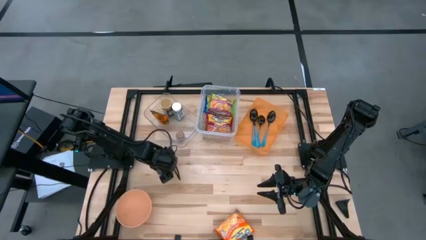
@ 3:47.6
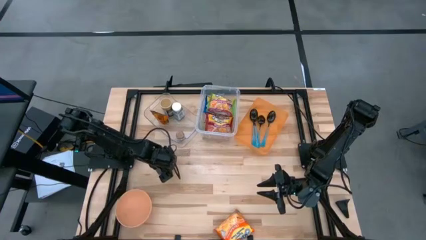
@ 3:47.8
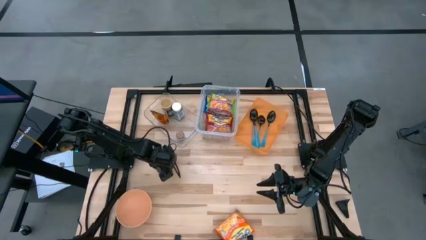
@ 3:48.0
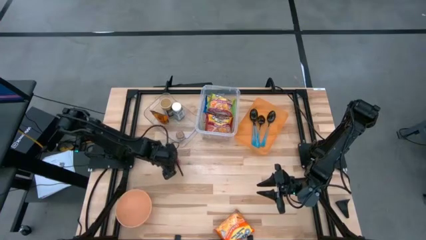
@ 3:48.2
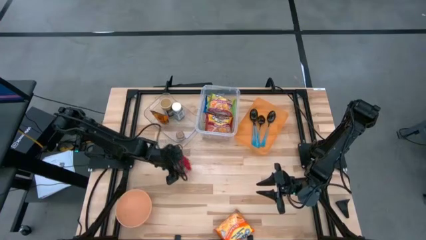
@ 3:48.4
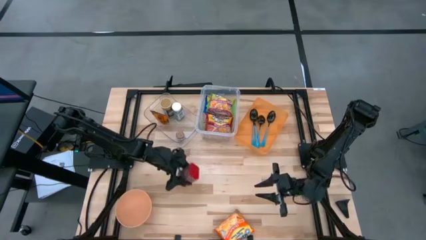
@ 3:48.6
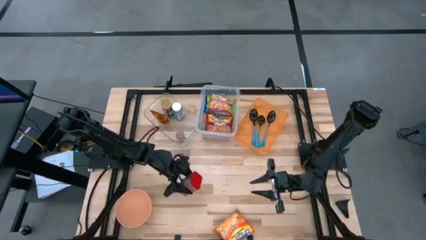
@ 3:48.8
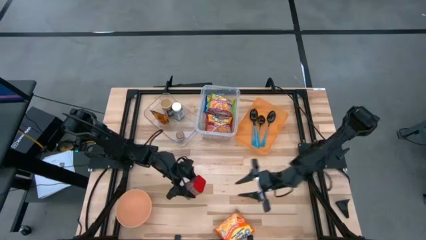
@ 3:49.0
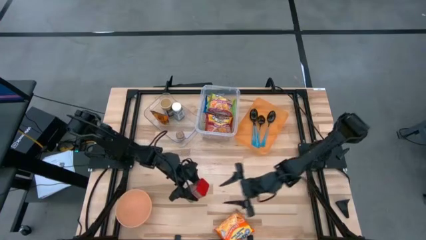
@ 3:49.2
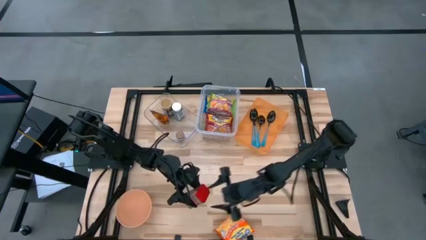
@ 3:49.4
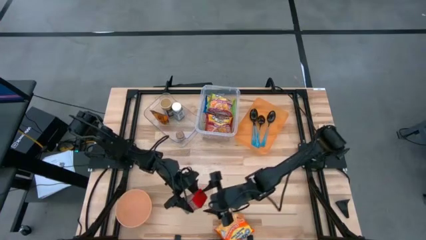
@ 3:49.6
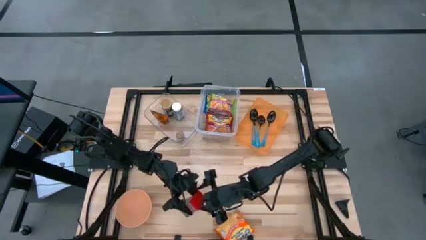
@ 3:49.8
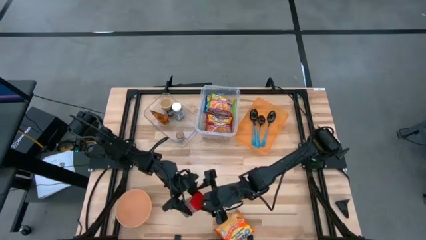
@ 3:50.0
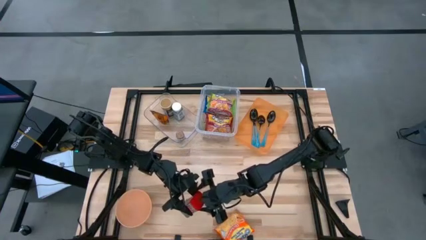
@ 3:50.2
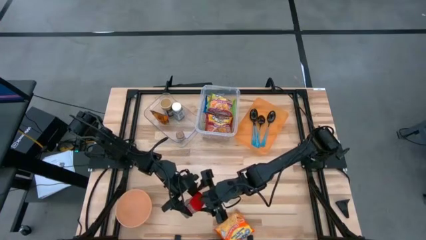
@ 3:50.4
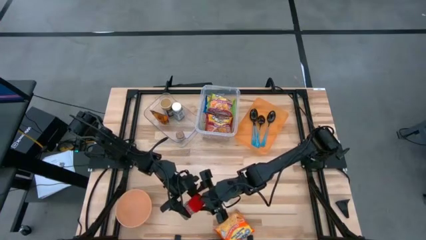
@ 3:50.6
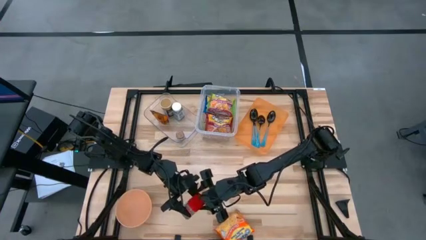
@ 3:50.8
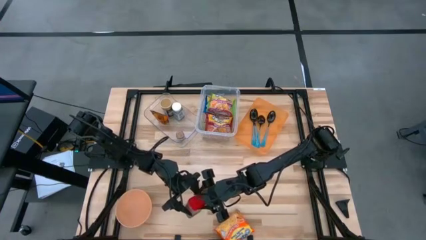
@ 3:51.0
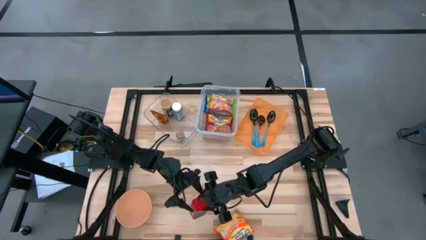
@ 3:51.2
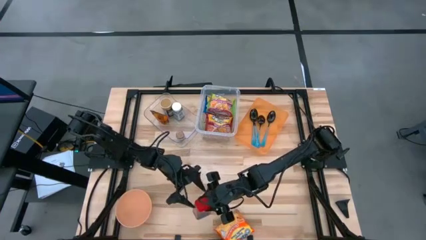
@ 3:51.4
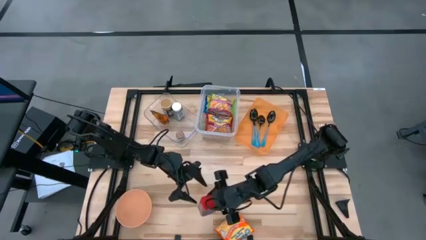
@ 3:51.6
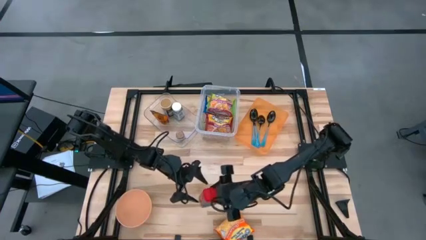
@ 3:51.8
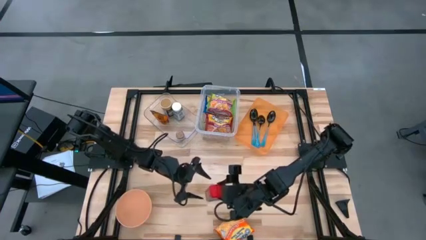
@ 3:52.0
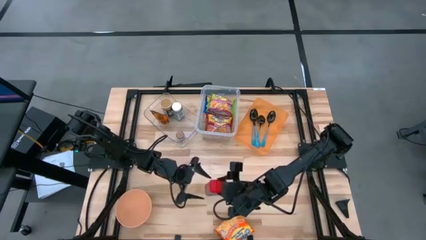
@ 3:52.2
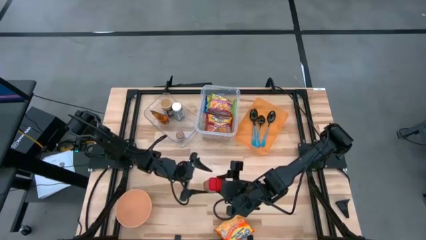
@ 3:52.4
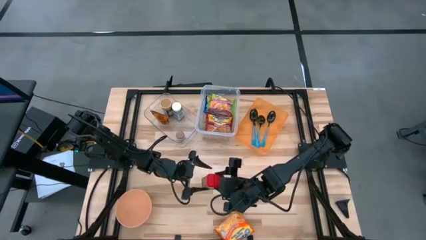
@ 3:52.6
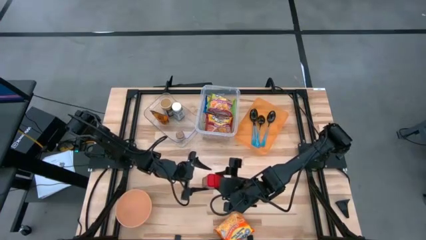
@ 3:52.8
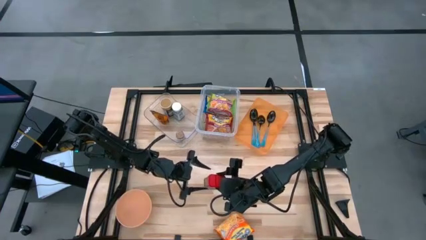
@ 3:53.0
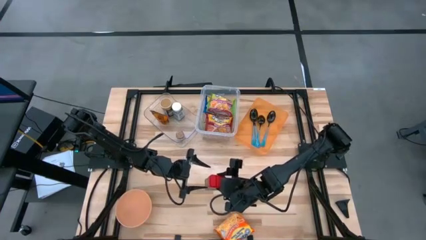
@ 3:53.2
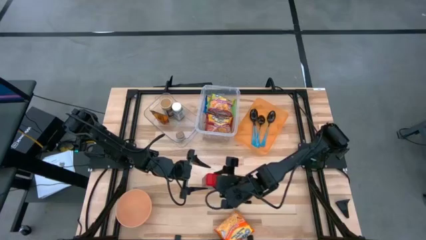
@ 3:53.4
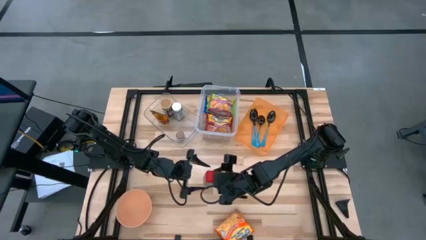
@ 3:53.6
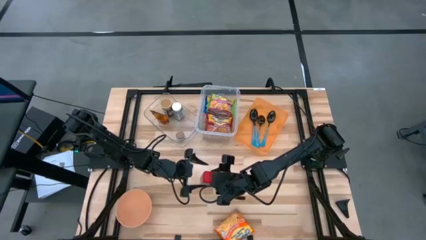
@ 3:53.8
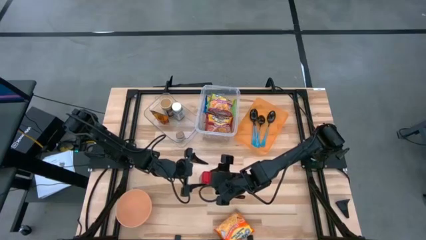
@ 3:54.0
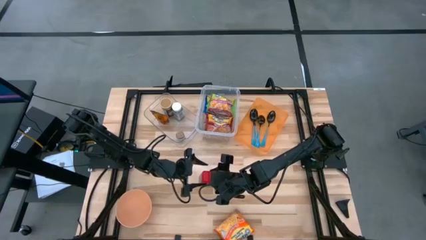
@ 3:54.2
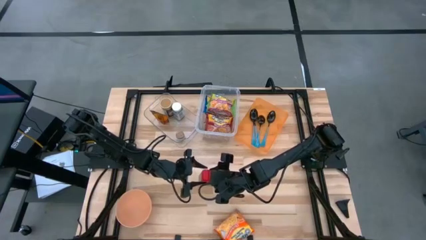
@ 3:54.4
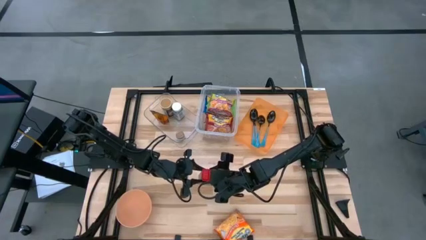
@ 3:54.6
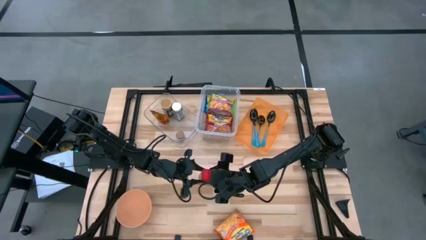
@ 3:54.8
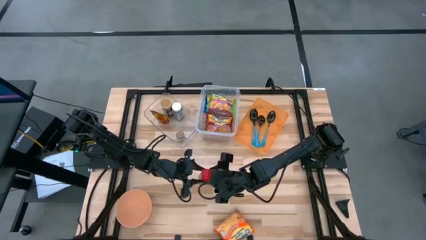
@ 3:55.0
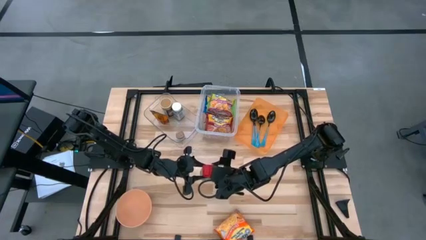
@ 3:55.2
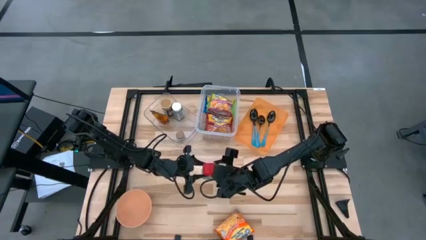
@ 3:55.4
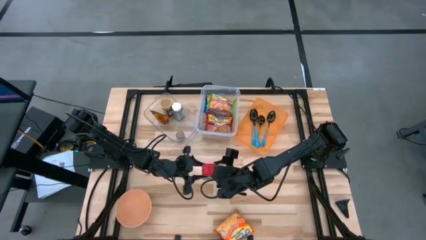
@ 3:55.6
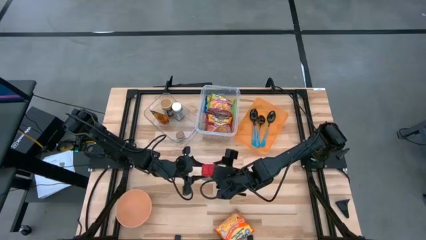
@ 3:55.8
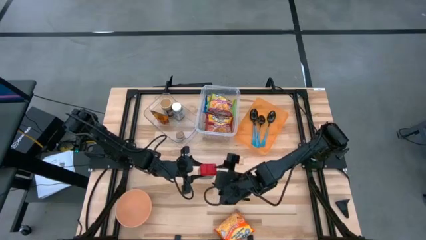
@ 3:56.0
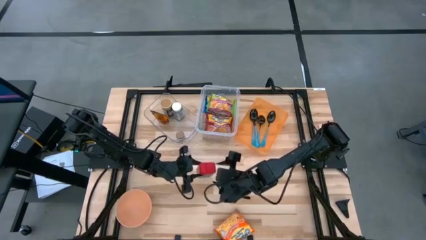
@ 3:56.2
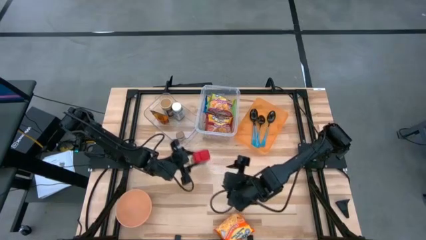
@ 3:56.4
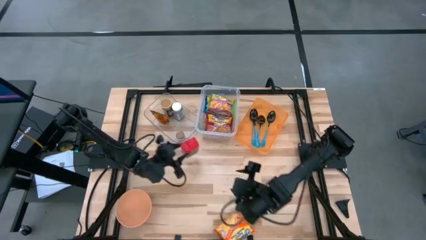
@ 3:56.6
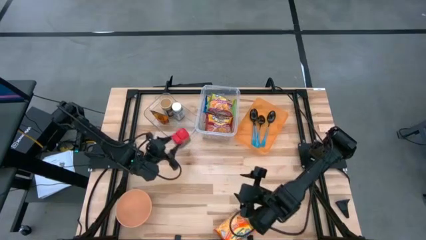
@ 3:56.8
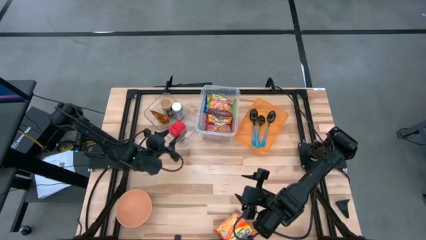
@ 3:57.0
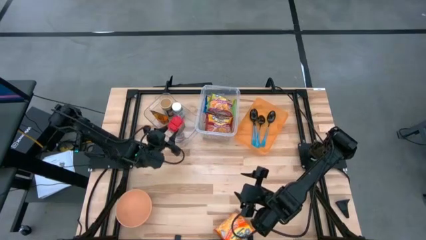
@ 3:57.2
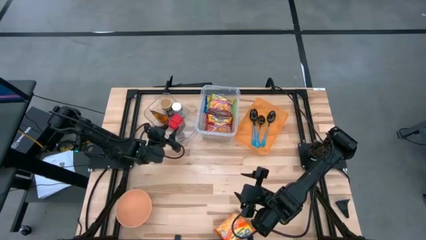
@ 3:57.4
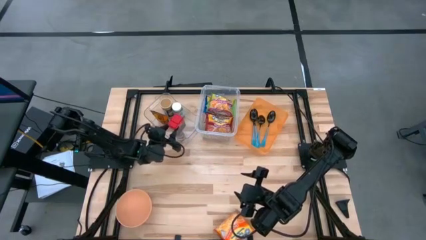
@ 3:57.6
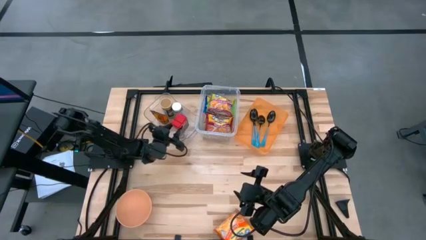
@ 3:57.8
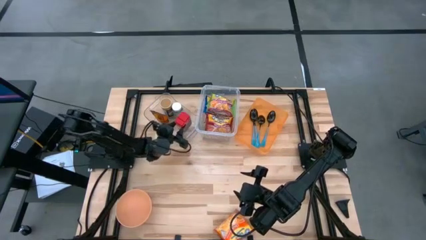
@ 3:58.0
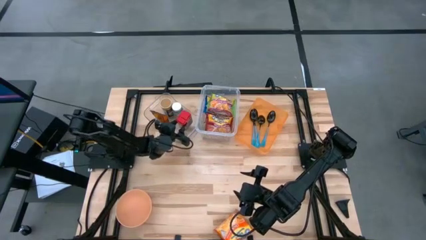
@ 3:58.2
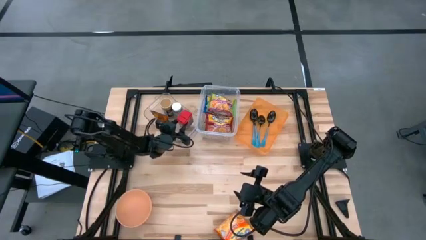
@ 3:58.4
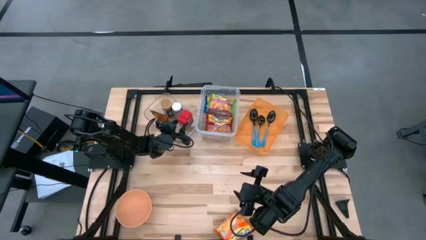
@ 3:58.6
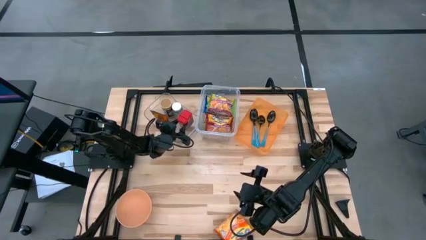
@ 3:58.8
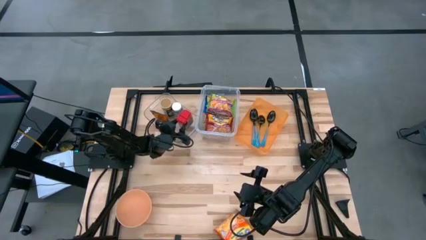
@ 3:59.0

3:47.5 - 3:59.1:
Task: Pick & Place Food Item
Put the red seasoning can into the transparent bin

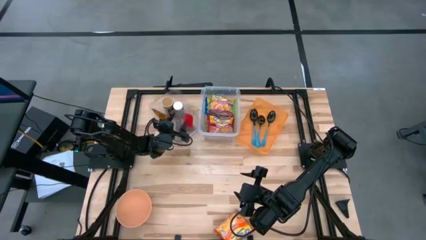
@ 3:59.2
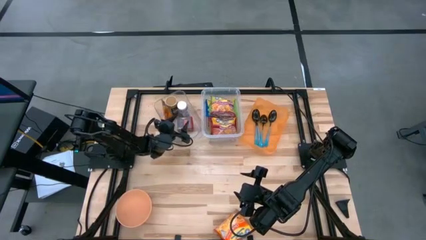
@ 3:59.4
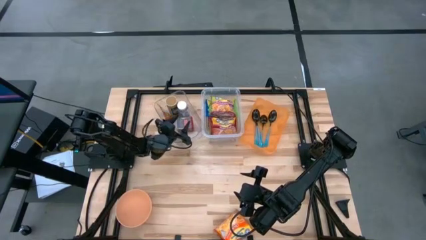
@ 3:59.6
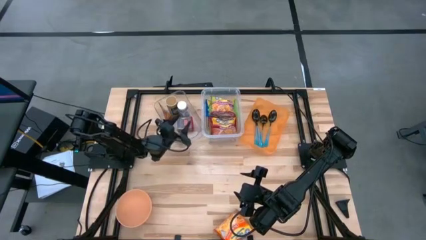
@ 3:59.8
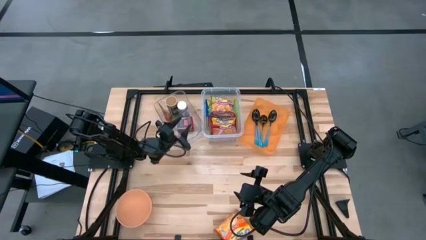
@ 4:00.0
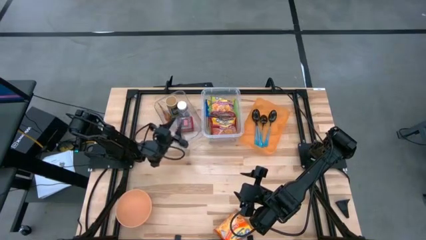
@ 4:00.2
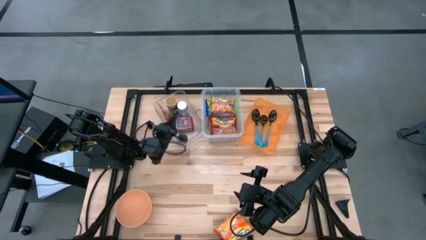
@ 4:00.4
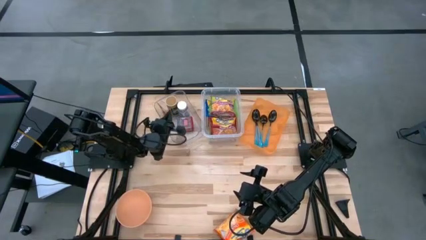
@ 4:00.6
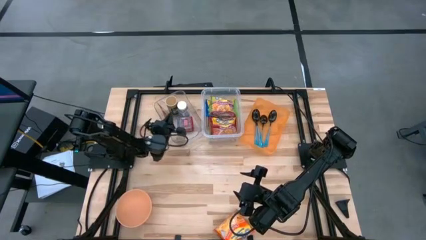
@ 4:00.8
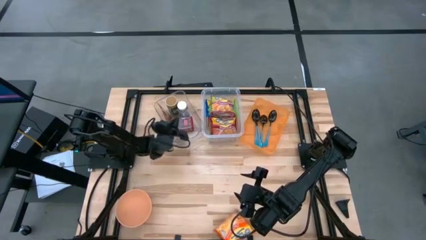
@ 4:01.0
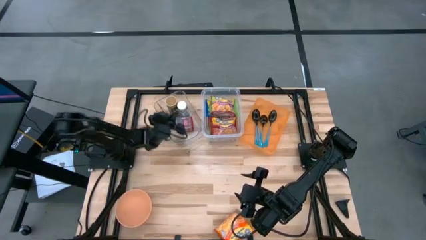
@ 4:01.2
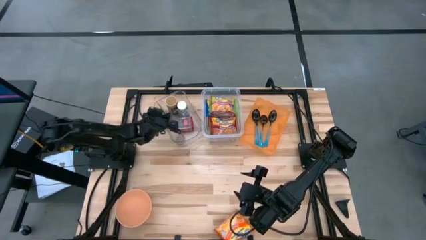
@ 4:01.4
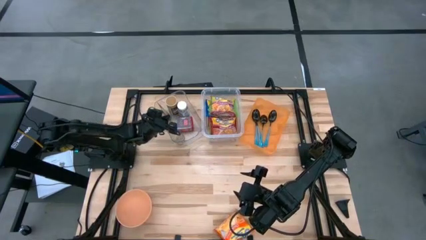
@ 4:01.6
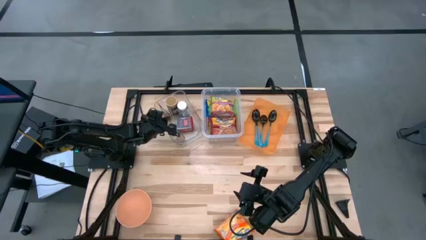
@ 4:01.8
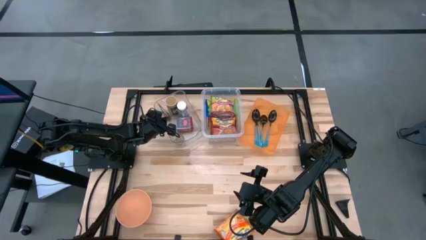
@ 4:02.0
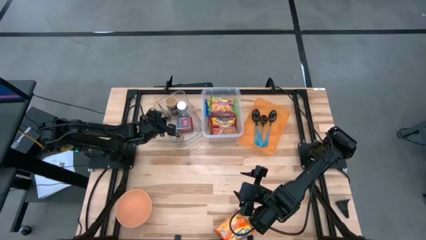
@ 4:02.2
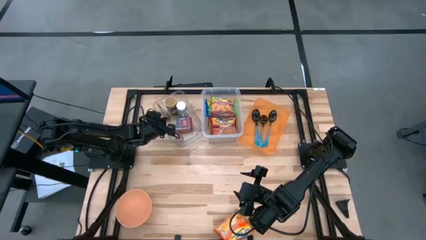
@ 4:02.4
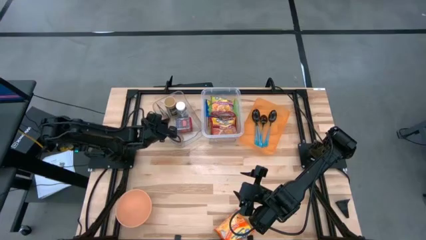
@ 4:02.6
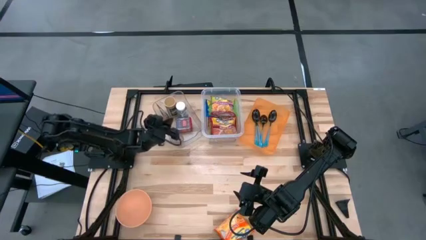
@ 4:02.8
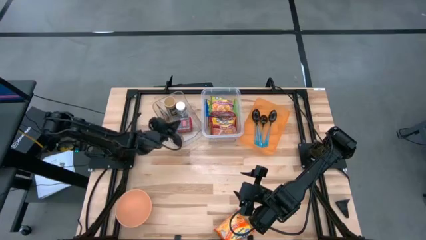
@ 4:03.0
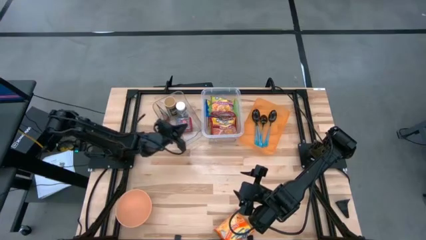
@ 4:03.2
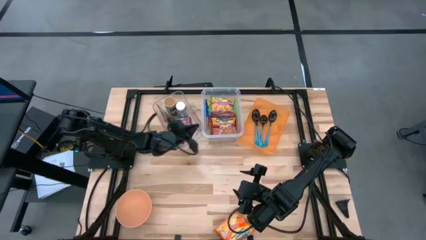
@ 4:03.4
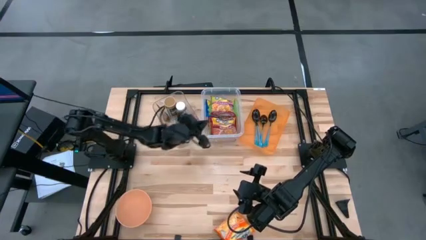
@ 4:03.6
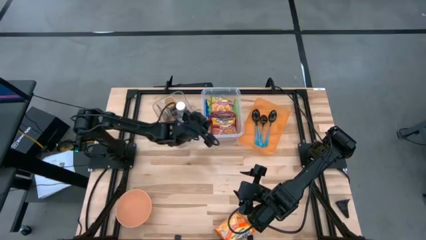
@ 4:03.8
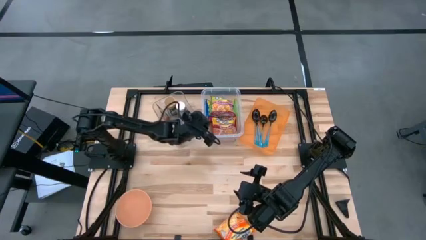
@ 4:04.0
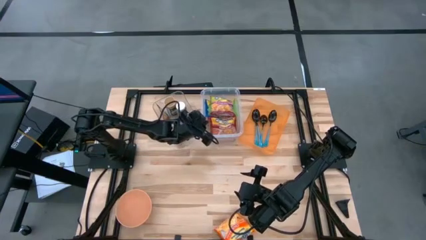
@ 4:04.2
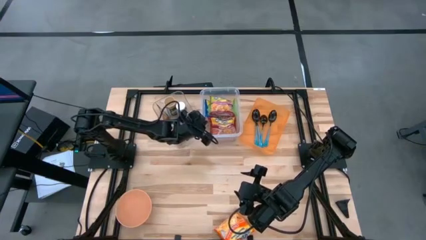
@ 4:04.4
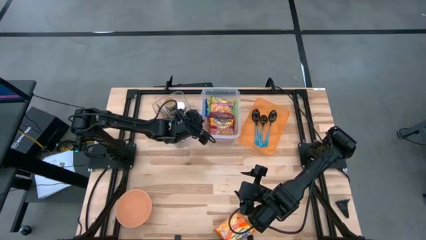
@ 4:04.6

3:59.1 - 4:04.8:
Adjust the bins
